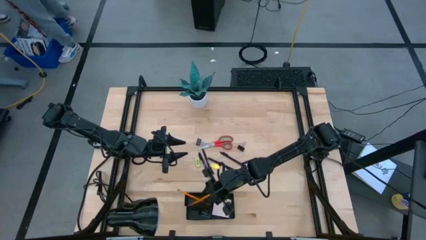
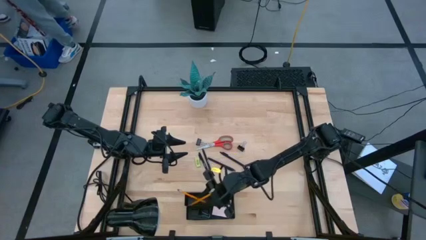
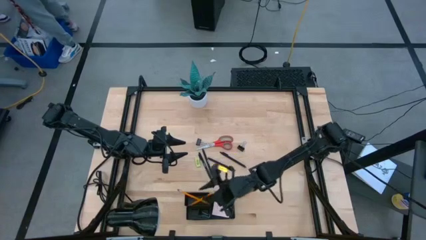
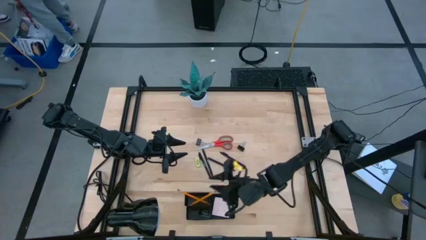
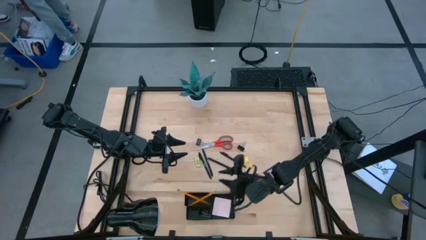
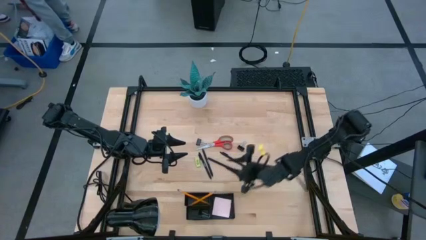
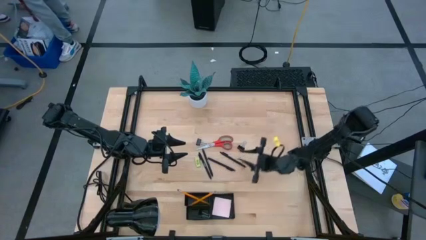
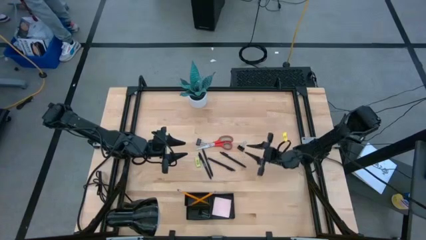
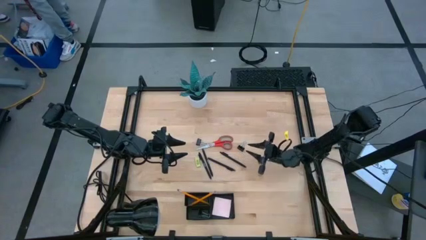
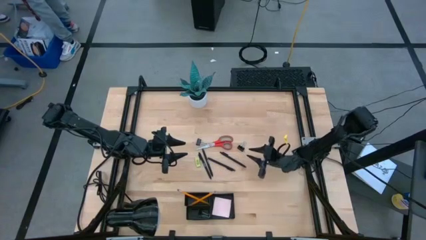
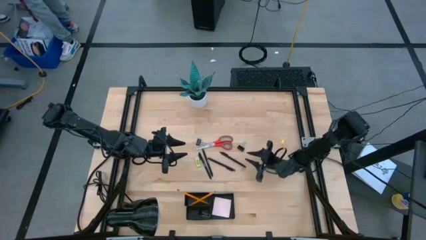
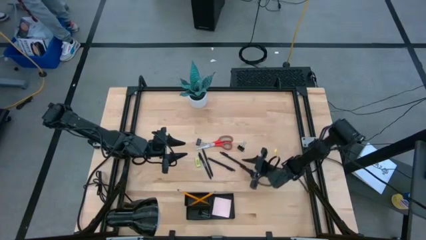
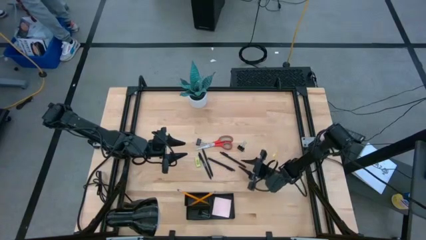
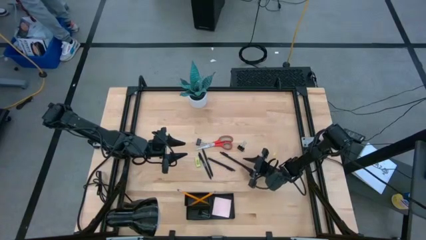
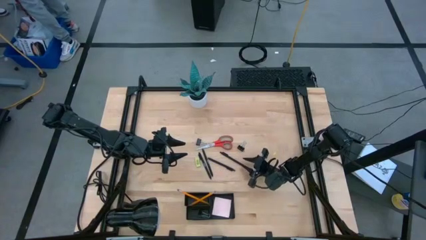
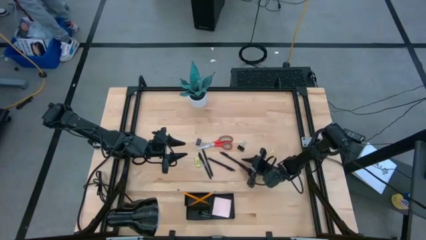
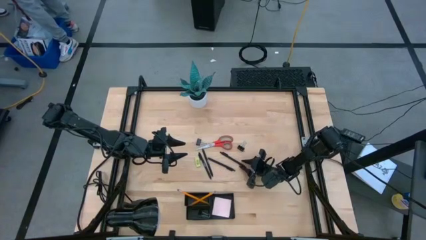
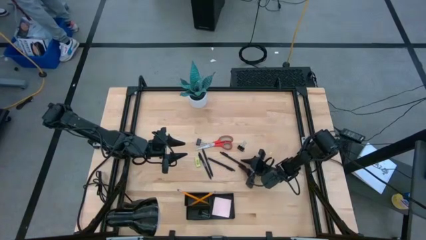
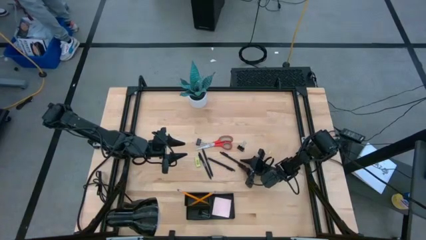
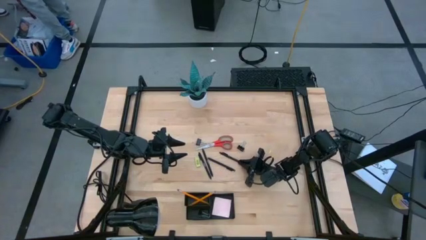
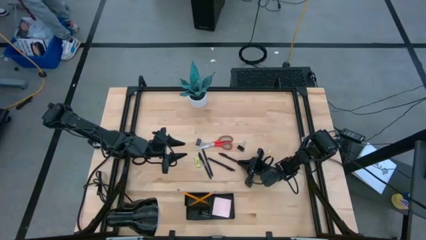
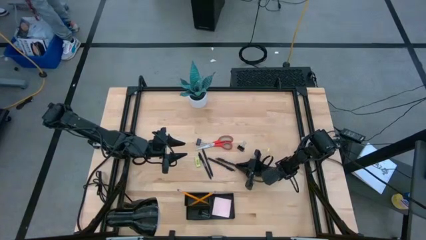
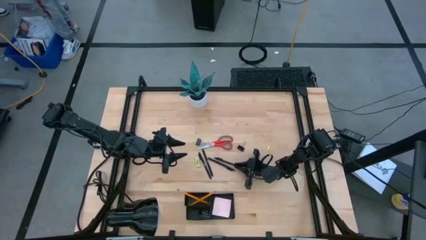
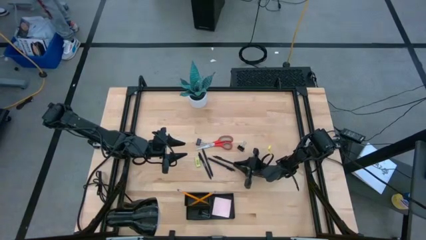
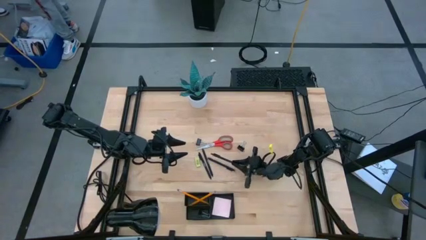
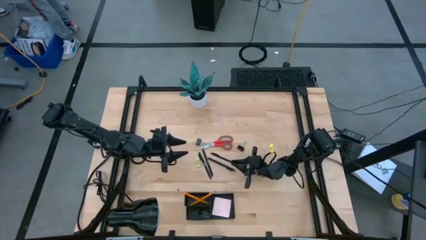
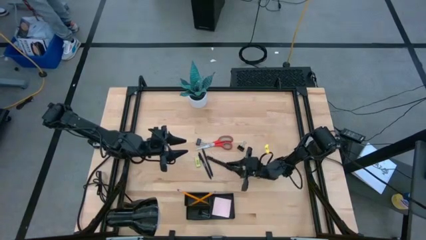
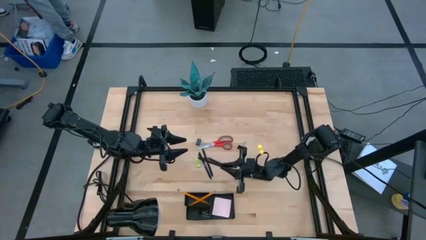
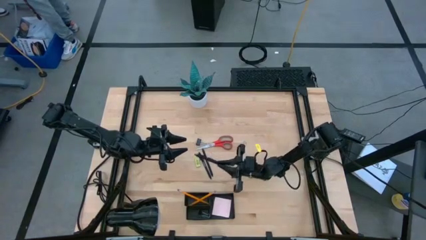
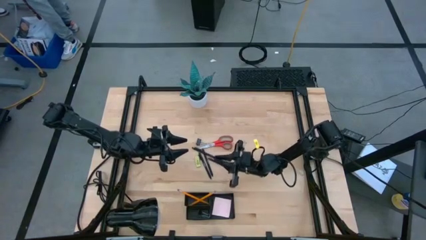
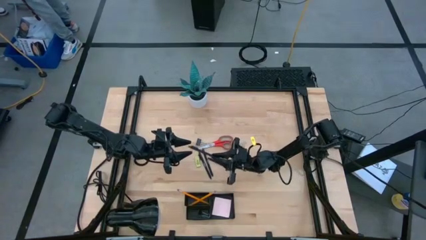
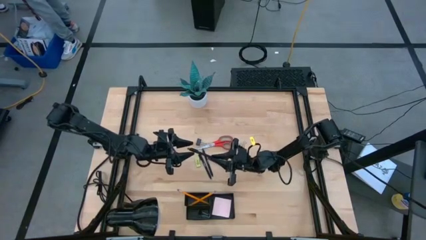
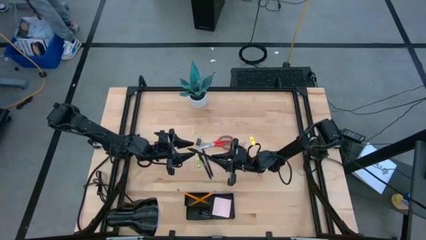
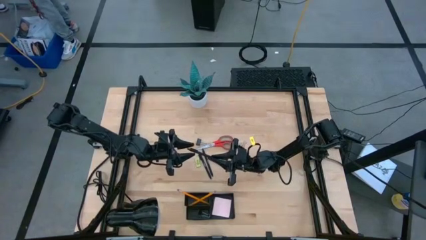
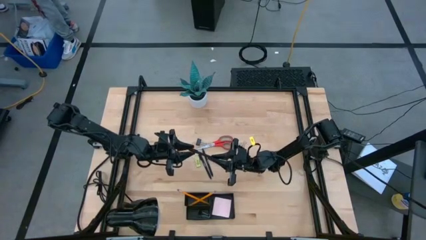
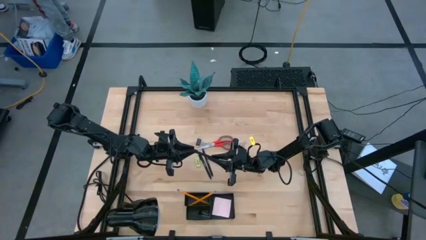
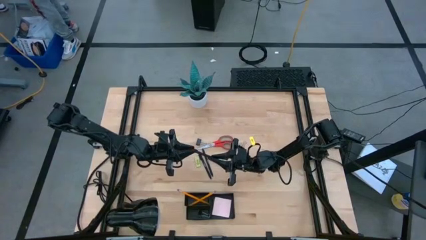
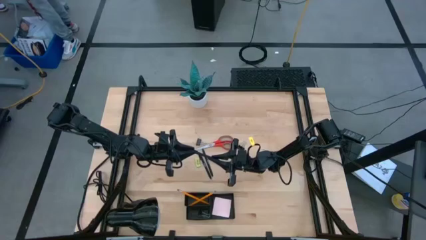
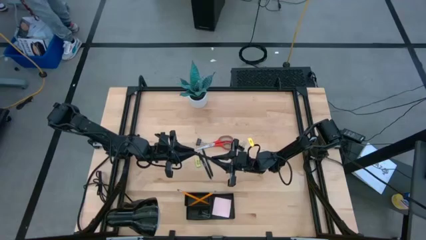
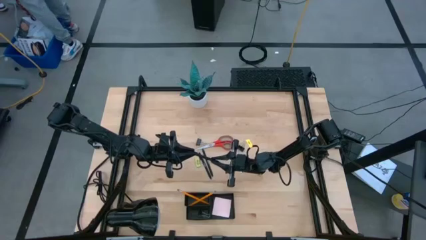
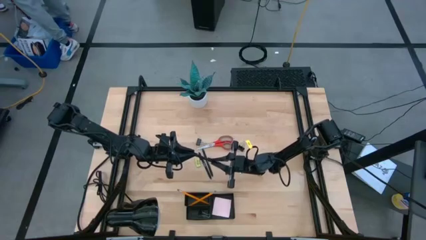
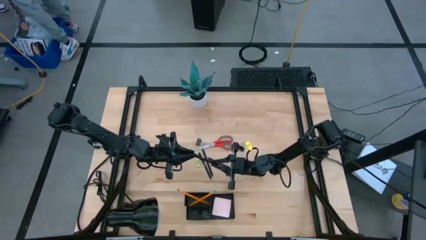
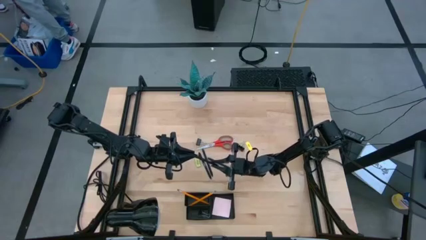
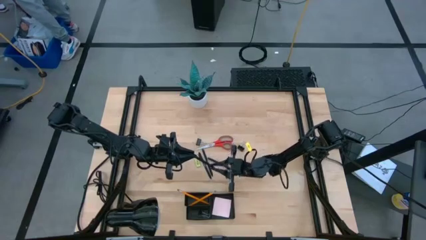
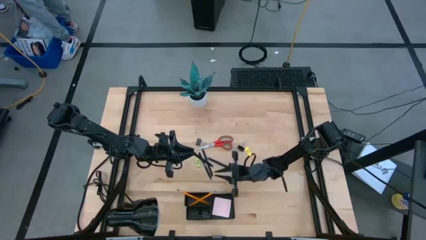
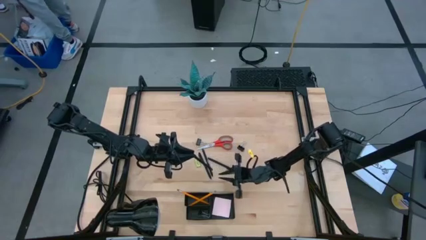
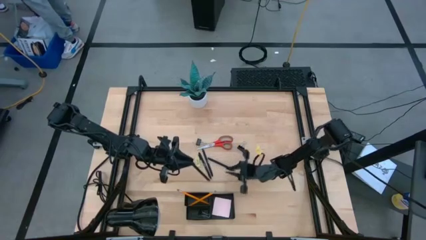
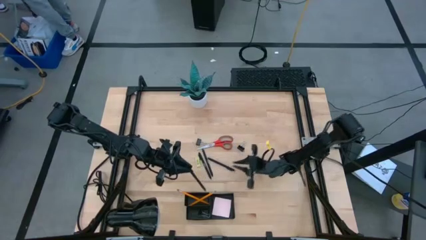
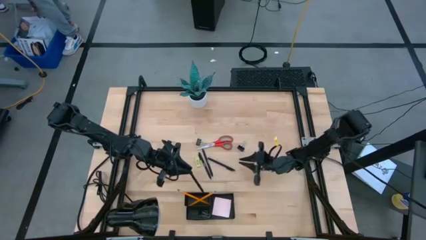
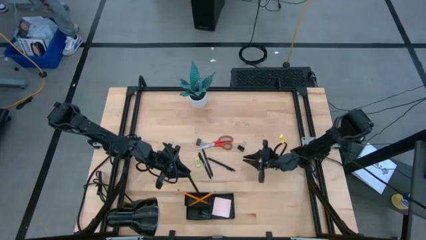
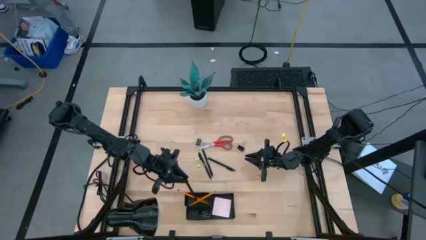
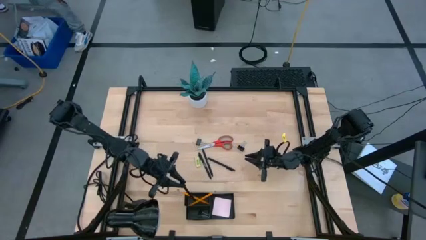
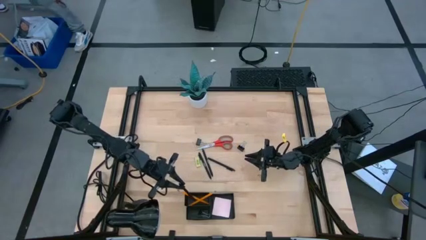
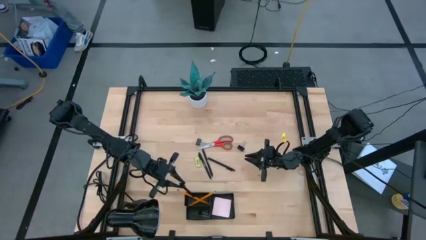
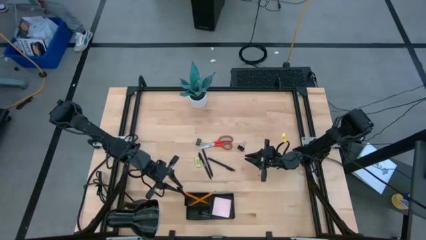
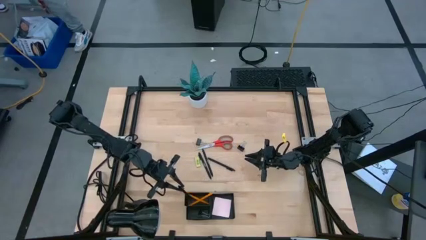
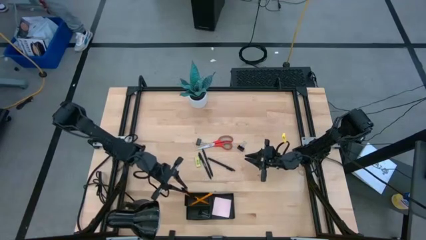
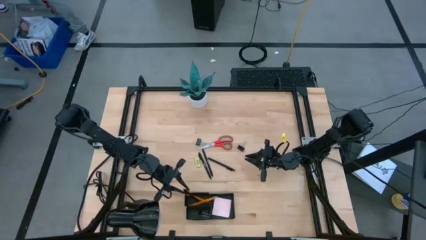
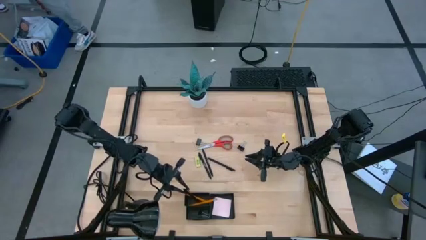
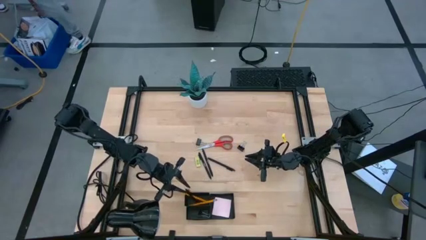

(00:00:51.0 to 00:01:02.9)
Task: Pick and place office supplies into organizer
Put the black pen into the black desk organizer

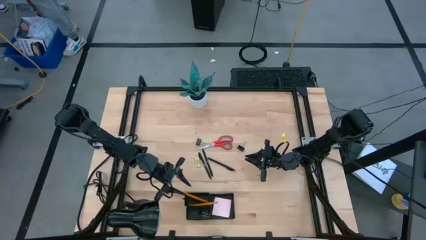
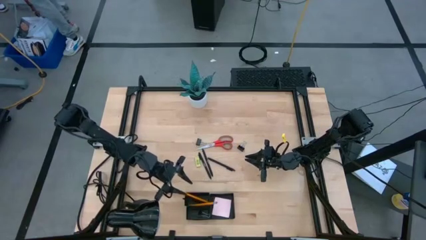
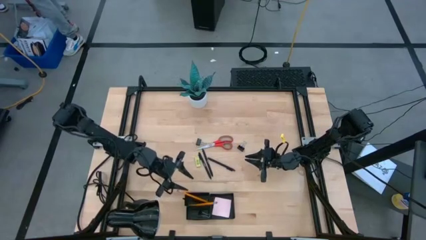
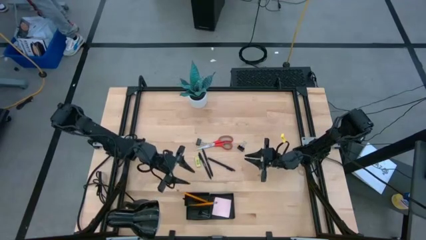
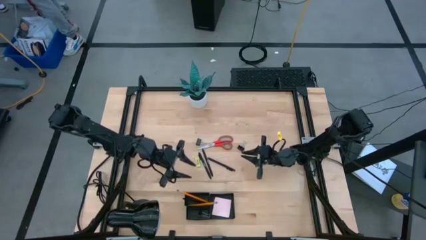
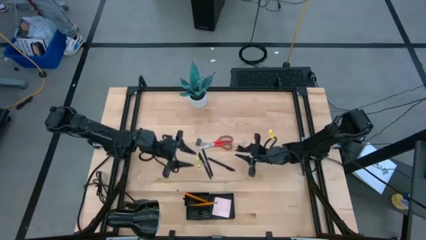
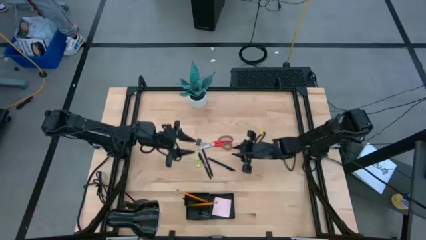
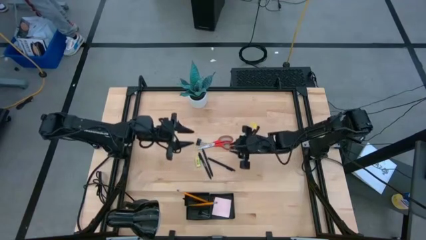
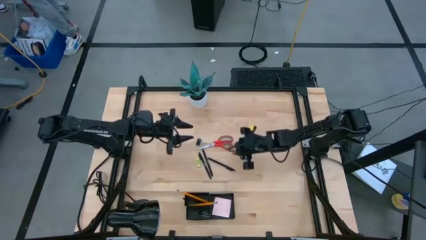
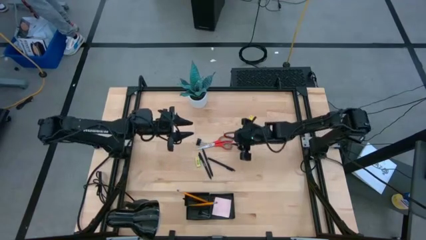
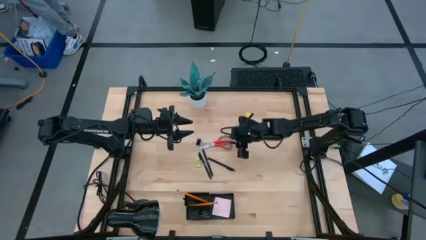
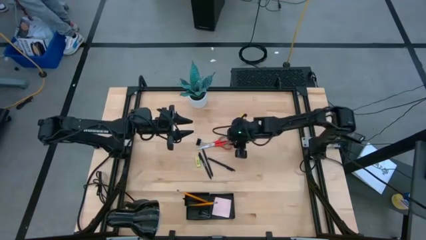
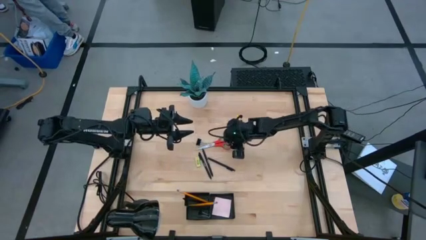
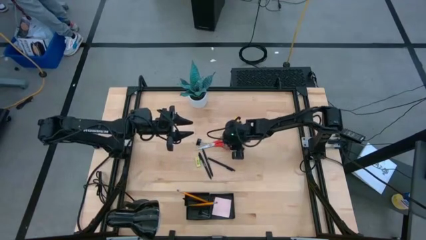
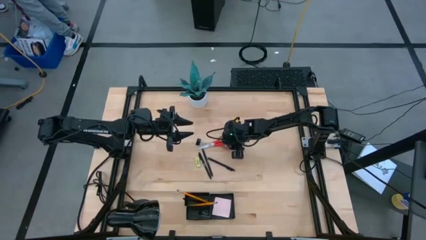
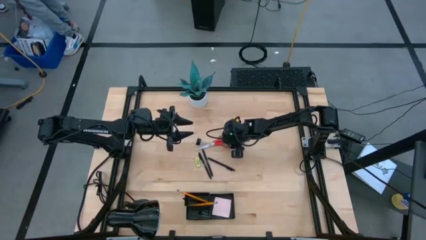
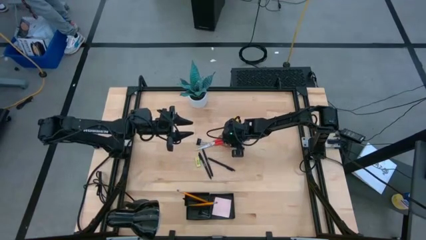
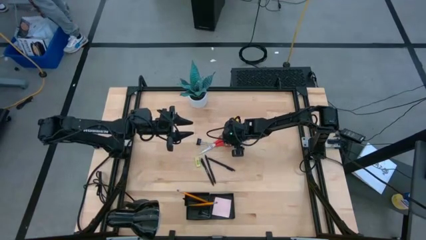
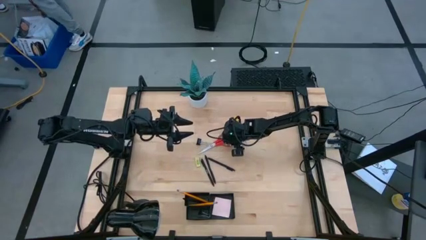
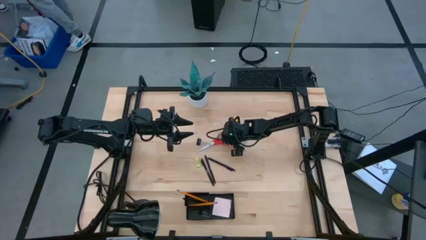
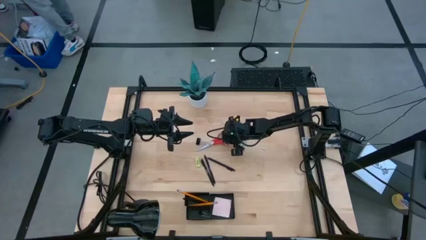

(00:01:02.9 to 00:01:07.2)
Put the red scissors into the black desk organizer

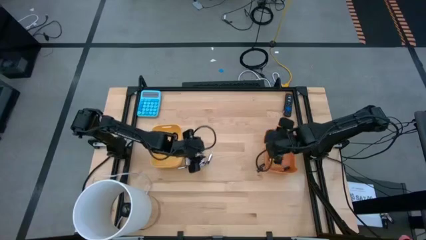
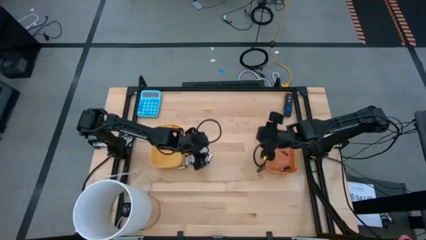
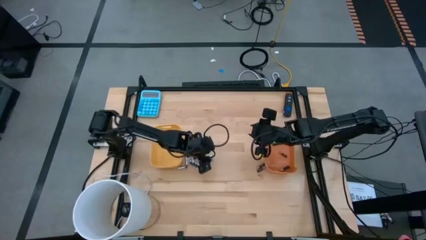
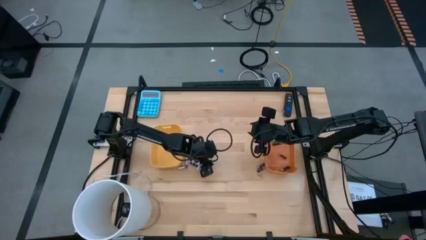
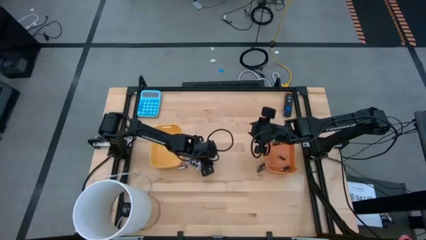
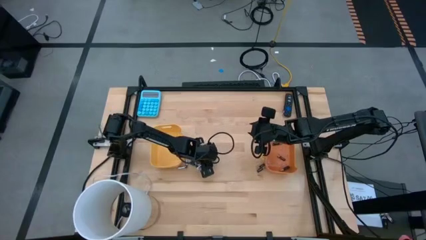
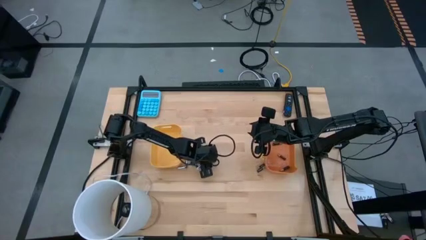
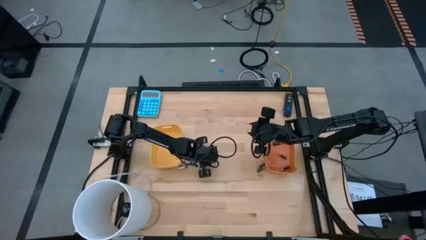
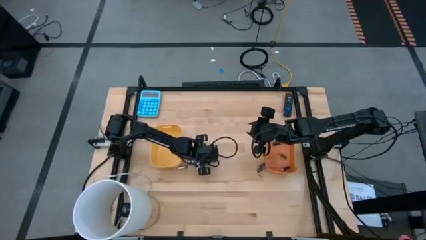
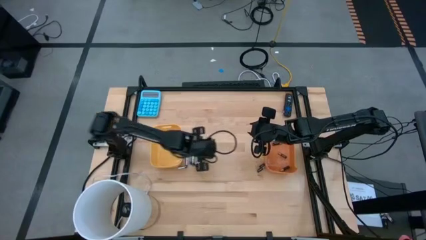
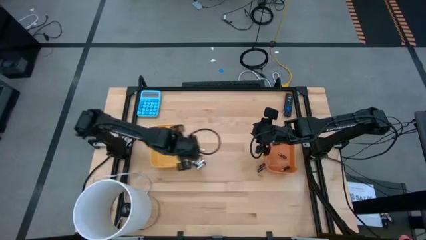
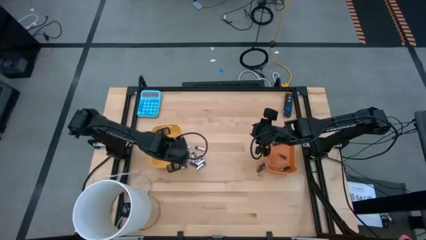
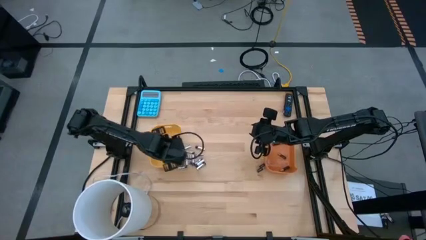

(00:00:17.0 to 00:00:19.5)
Task: Sort batteries
Put the silver battery into the yellow bin
